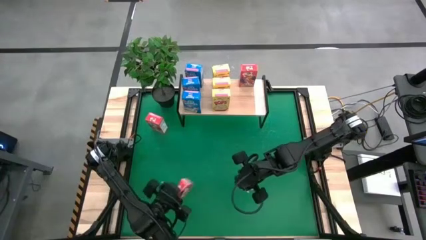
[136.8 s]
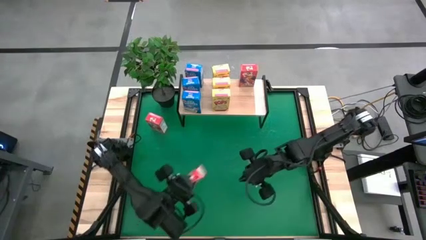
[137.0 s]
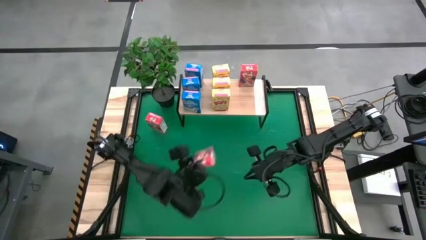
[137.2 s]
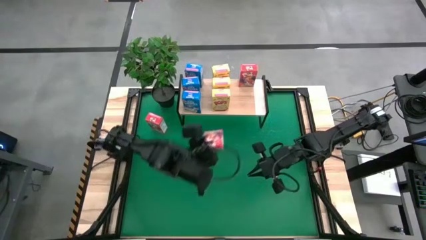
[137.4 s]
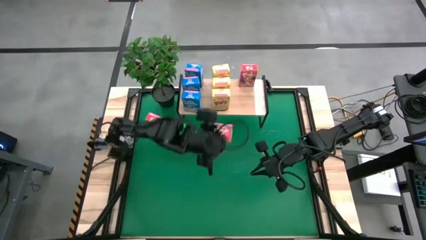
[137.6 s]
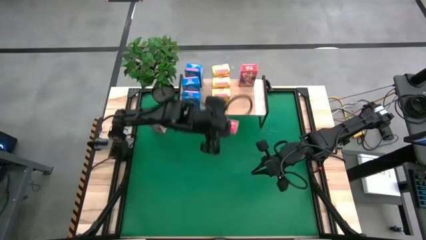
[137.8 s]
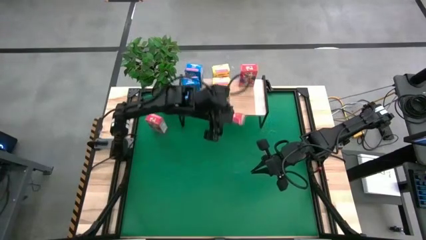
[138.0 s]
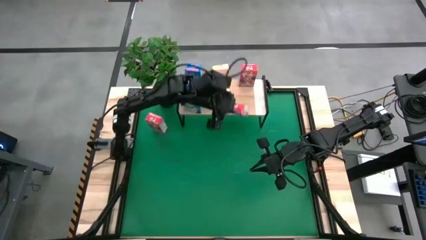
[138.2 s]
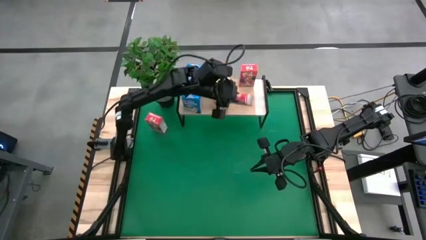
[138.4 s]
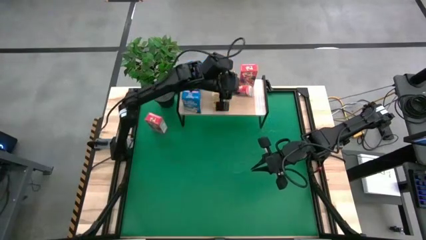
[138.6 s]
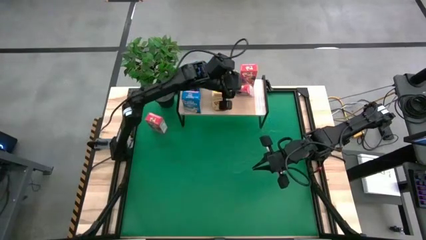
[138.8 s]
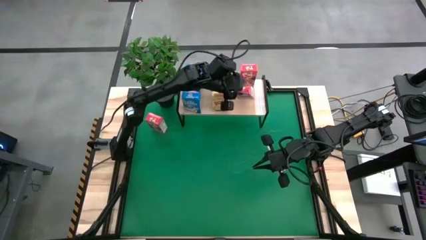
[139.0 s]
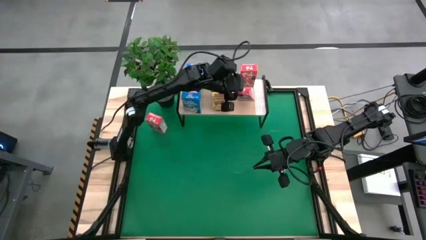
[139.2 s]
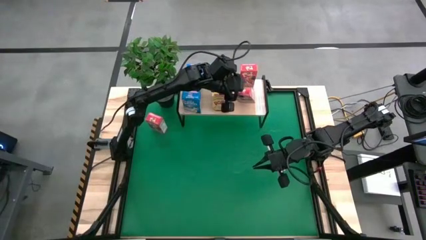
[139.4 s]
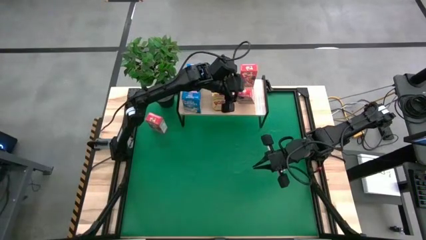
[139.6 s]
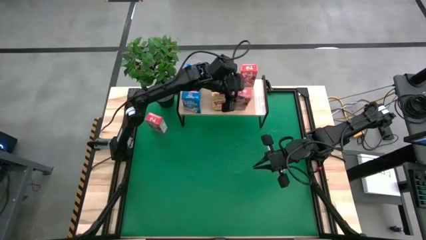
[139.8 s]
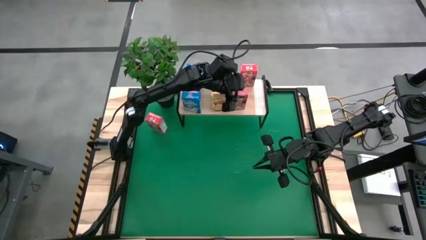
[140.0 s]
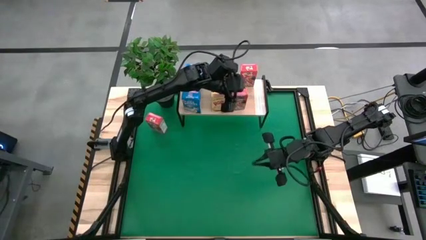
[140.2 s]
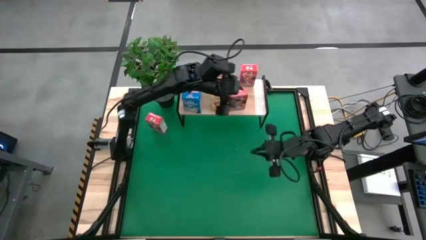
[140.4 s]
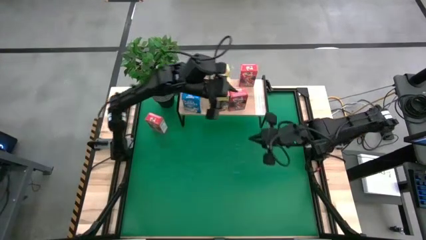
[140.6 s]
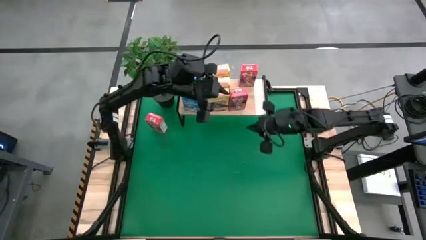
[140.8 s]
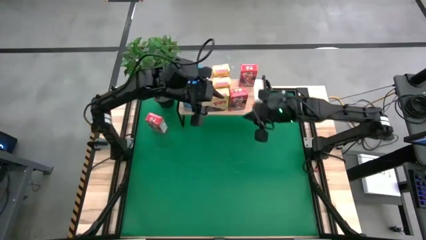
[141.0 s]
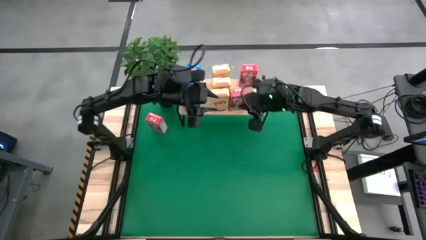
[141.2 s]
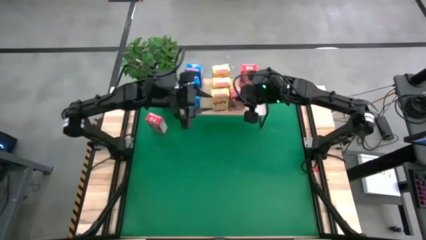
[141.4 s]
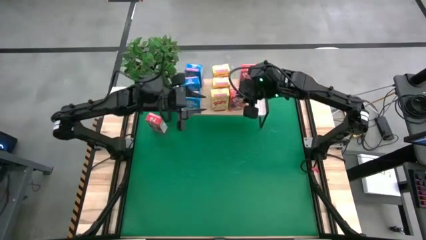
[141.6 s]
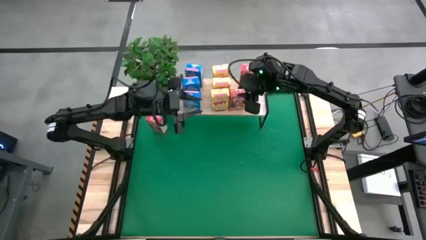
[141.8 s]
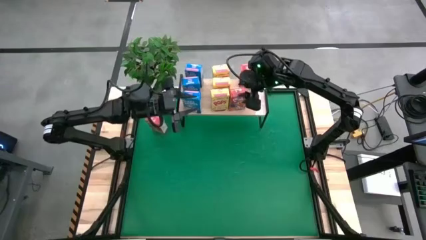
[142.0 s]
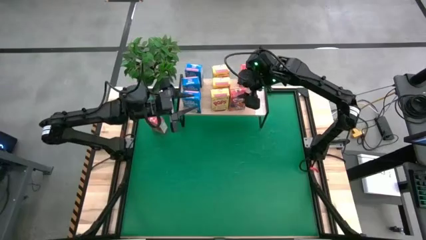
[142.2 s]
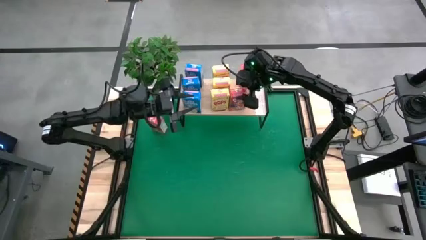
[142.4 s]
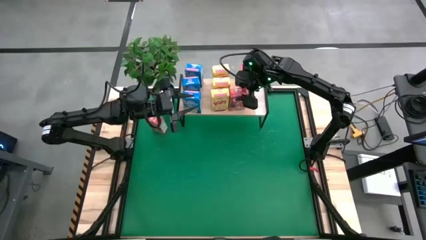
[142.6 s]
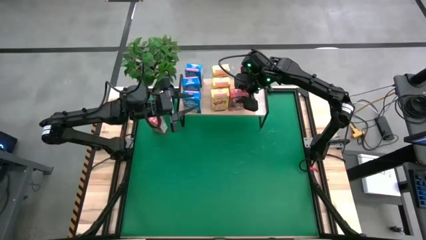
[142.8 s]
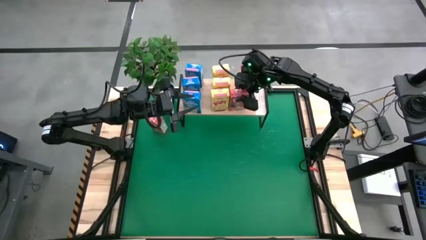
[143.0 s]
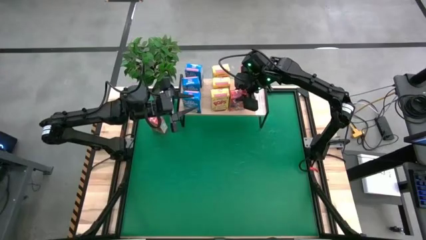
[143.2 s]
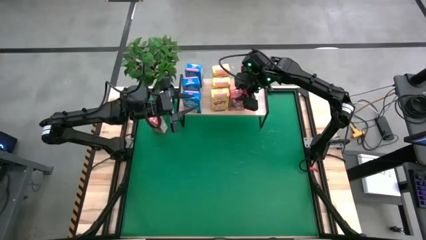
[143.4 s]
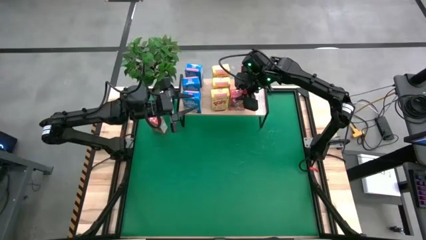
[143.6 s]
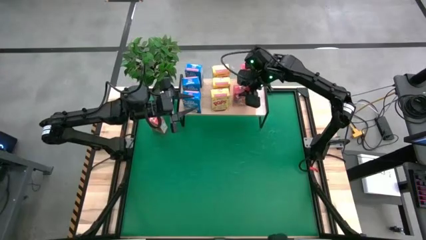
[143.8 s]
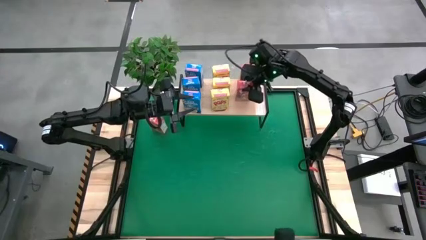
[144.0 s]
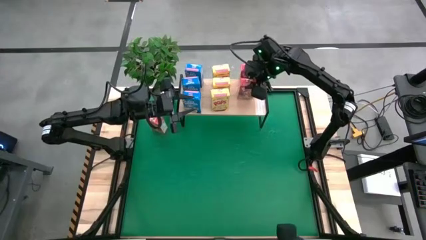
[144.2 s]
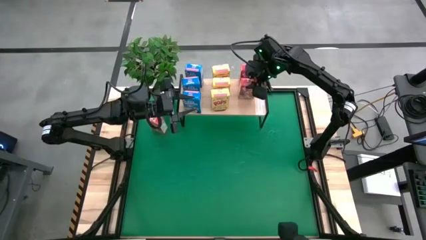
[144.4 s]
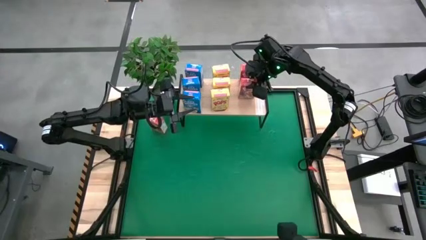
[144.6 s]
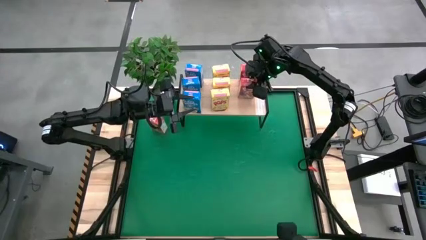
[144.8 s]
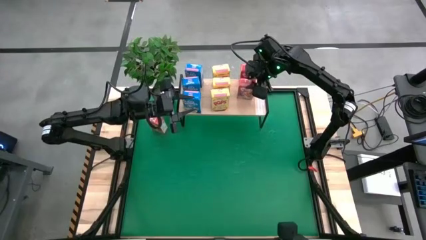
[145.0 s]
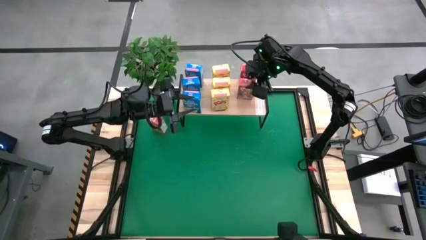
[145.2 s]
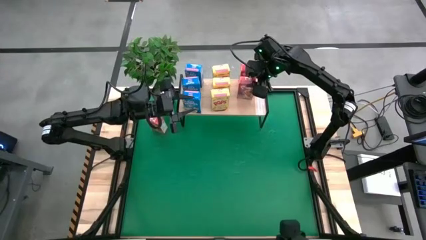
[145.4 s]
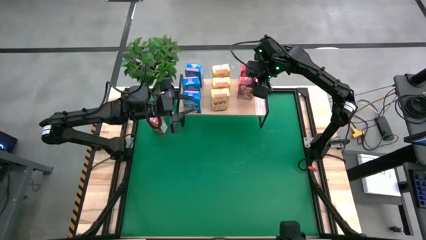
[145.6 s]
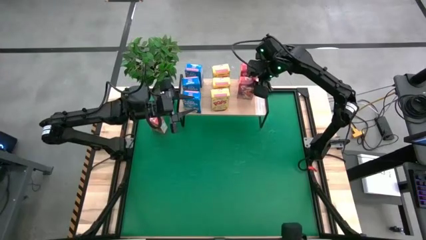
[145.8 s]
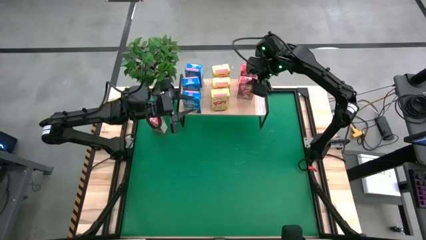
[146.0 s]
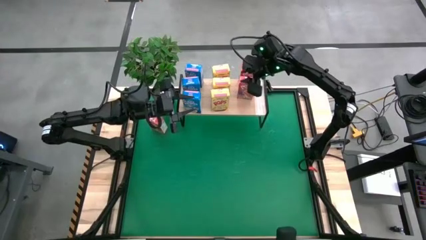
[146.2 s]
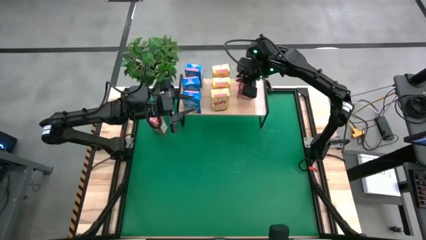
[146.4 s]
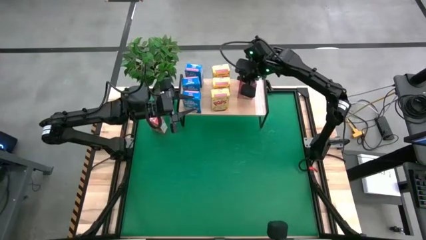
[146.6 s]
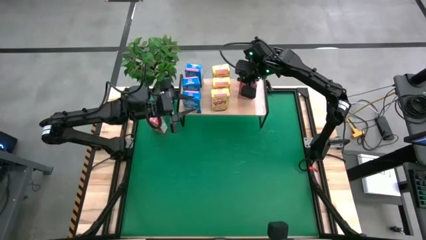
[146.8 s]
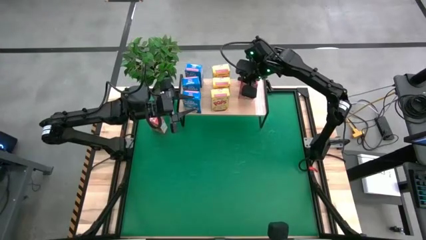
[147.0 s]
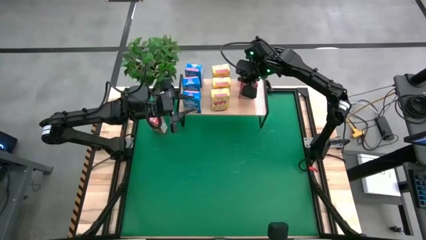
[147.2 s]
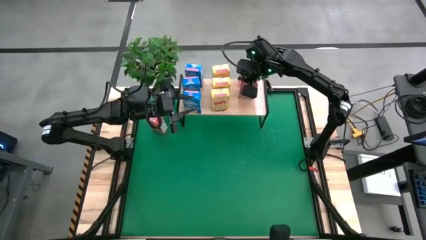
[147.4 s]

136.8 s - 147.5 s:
Task: Stack cereal on shelf
Put the bottom red cereal box on the shelf

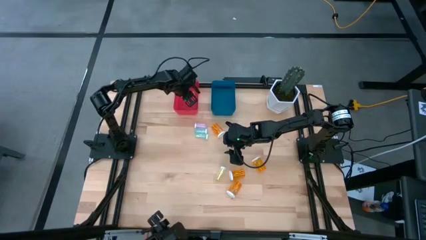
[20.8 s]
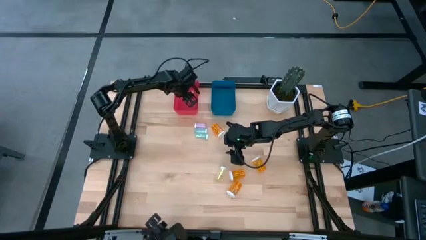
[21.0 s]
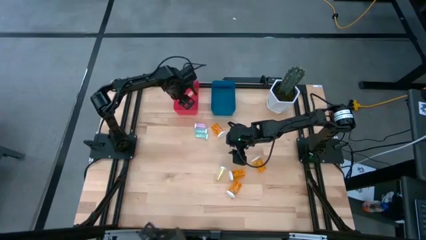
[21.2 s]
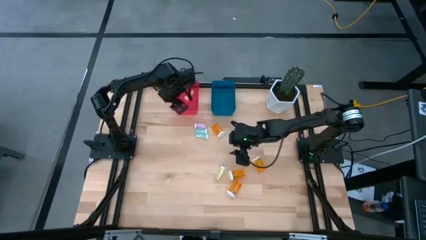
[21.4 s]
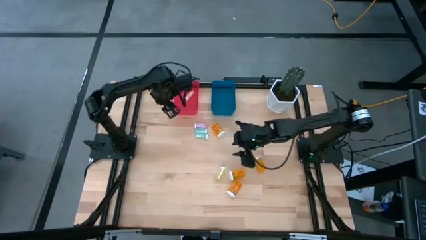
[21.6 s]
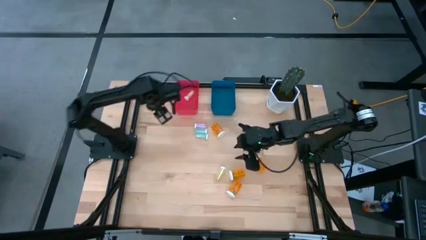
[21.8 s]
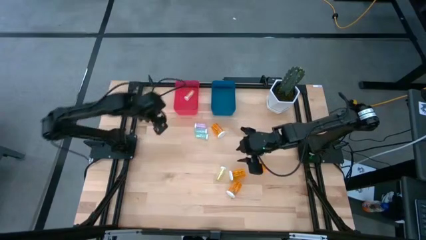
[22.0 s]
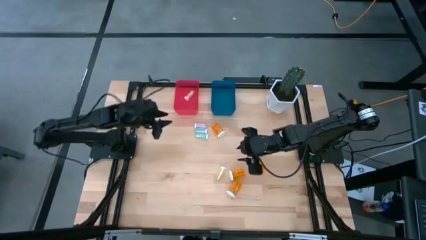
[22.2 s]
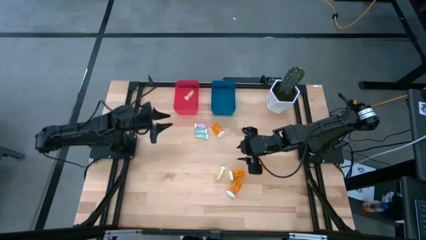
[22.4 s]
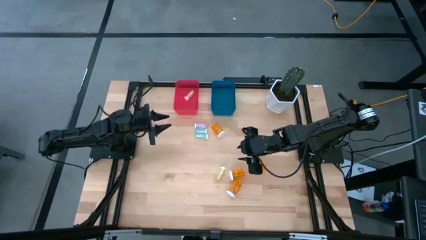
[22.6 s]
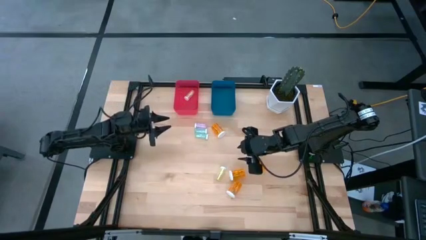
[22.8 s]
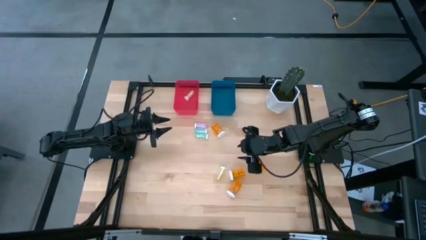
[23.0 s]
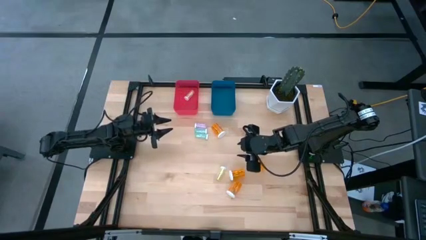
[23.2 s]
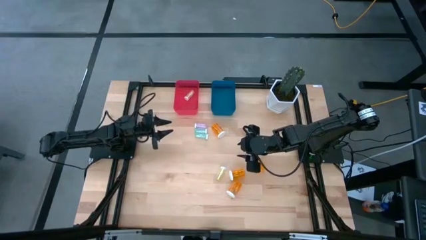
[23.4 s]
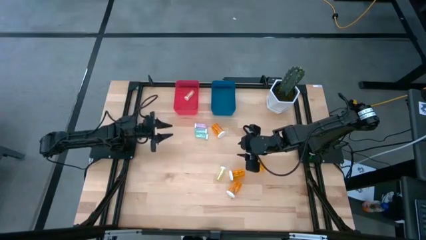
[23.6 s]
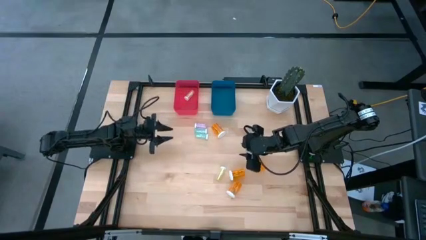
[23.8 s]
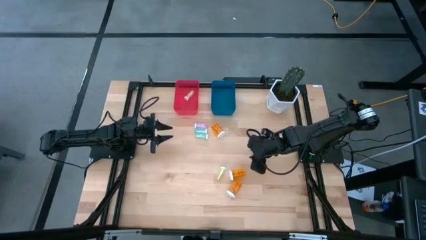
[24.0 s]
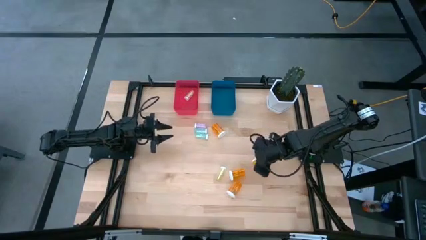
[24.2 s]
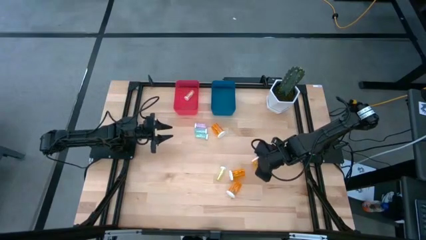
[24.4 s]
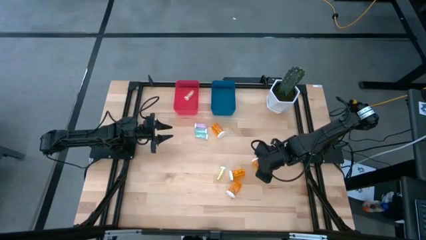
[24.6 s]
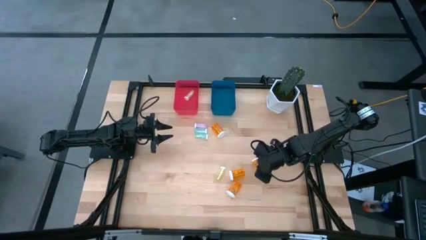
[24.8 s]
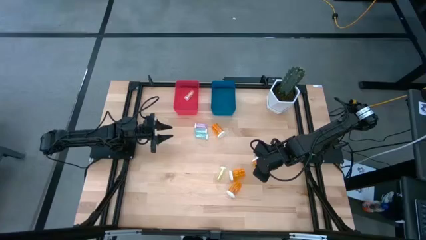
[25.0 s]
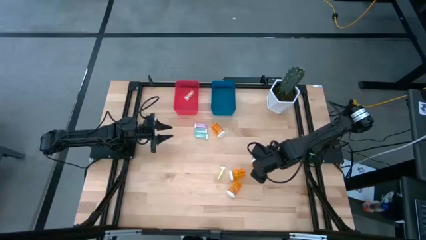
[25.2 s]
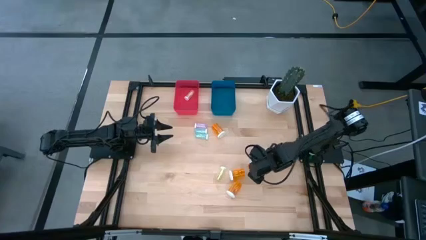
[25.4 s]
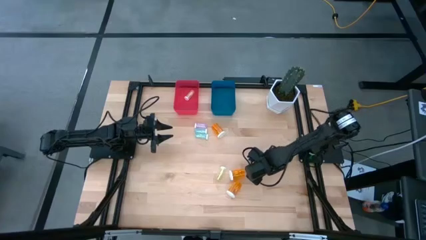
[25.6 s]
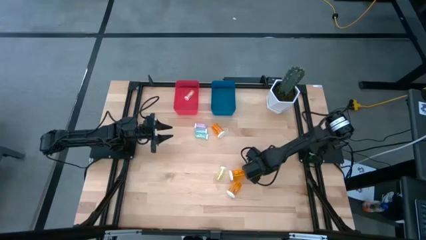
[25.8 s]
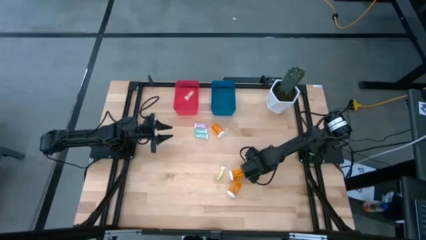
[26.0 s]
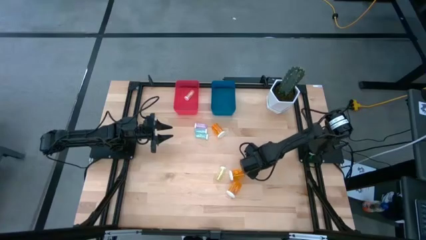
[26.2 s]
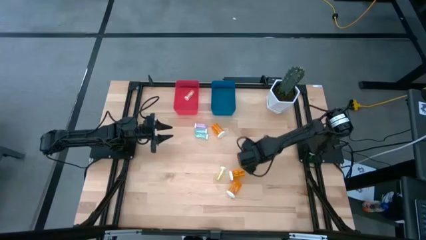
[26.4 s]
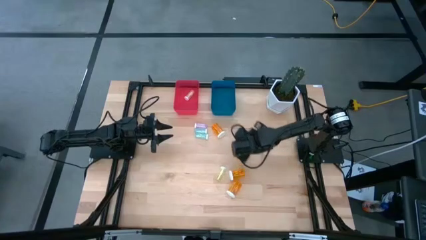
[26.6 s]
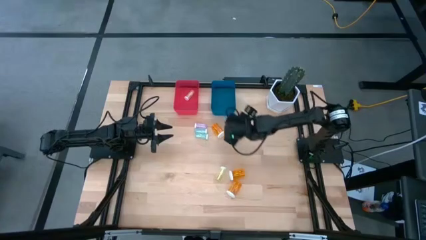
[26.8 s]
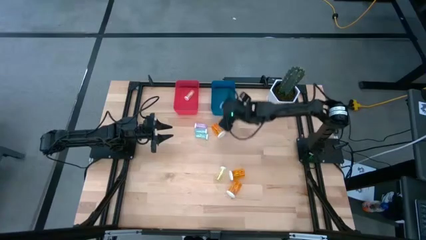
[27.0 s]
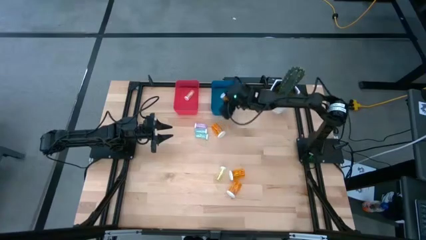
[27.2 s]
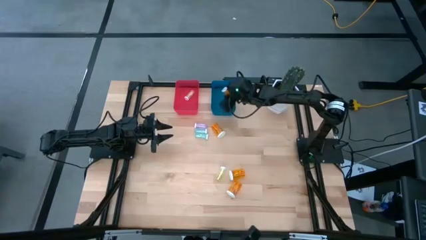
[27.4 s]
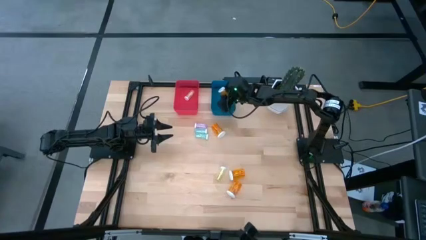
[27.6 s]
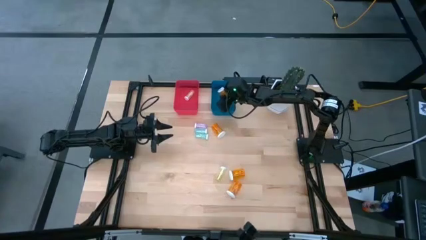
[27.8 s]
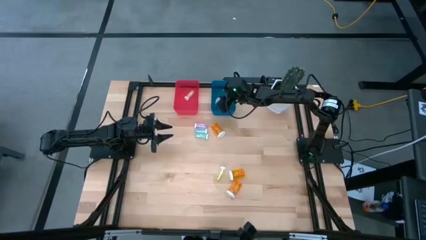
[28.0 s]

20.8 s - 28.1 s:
Task: Pick and place medicine bottles into bin by pill shape (circle, oval)
Put the orange capsule bottle into the blue bin
